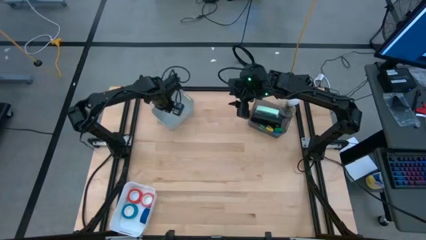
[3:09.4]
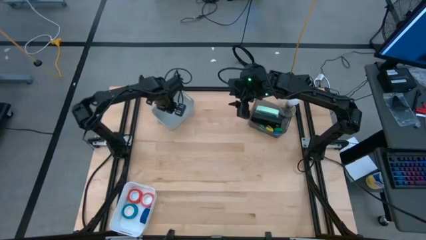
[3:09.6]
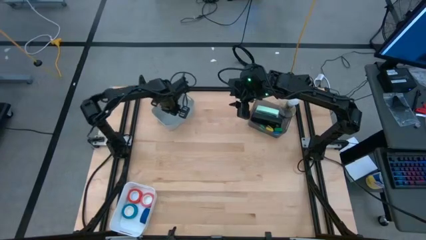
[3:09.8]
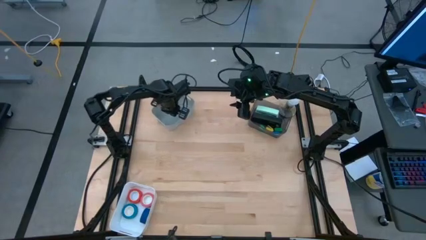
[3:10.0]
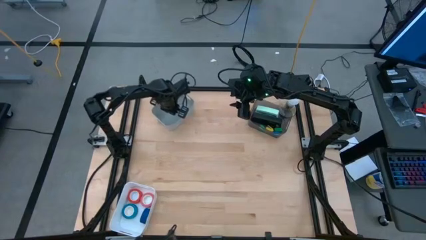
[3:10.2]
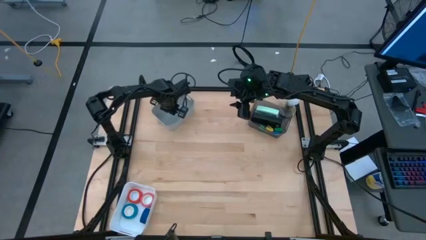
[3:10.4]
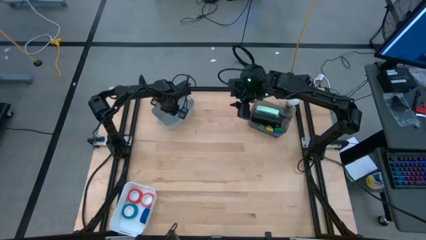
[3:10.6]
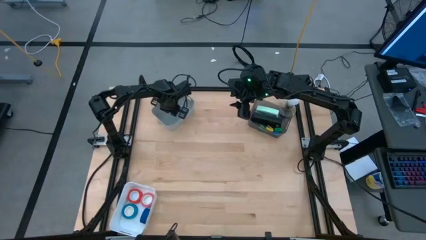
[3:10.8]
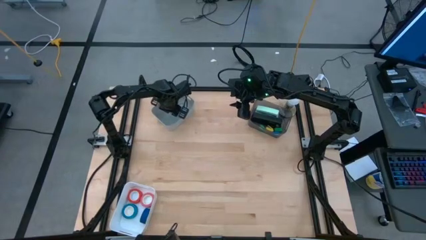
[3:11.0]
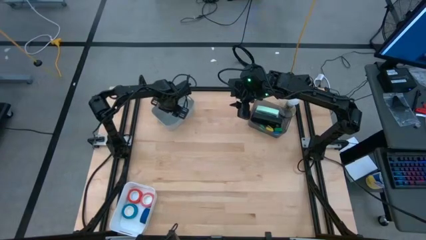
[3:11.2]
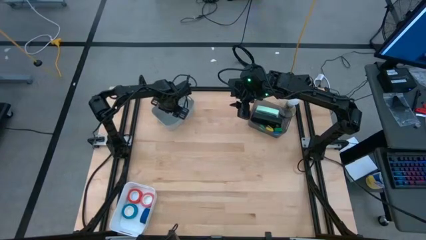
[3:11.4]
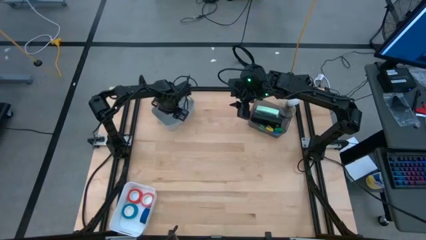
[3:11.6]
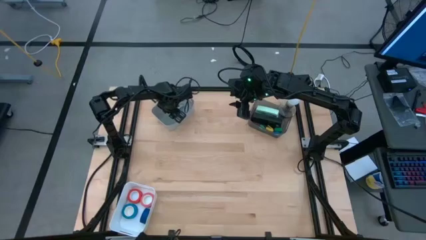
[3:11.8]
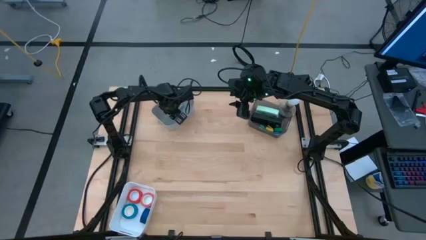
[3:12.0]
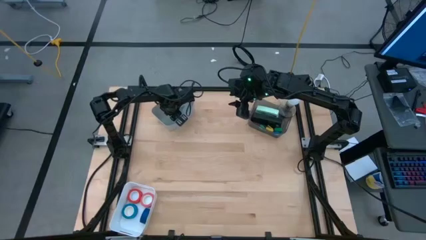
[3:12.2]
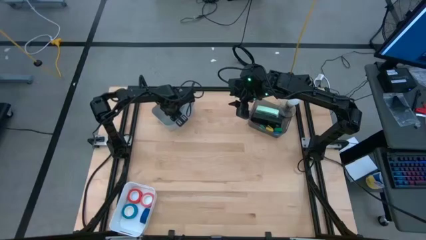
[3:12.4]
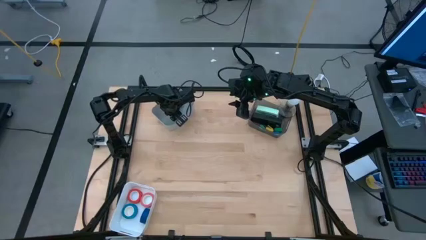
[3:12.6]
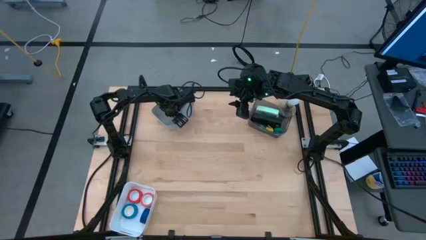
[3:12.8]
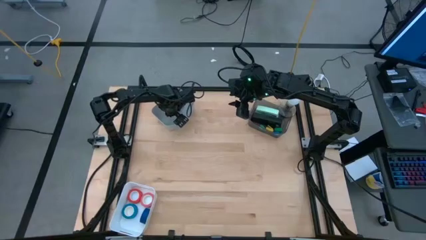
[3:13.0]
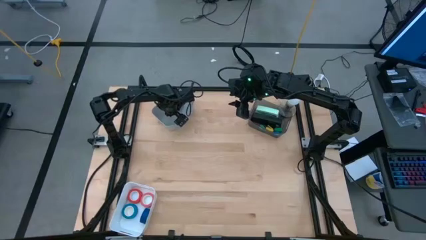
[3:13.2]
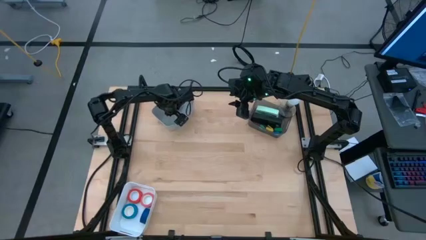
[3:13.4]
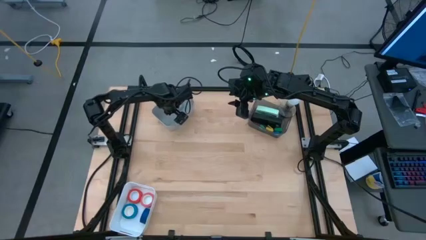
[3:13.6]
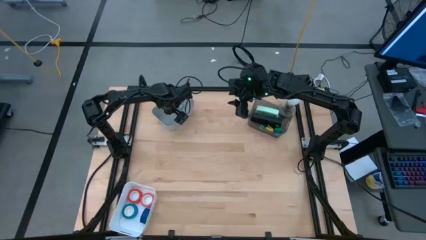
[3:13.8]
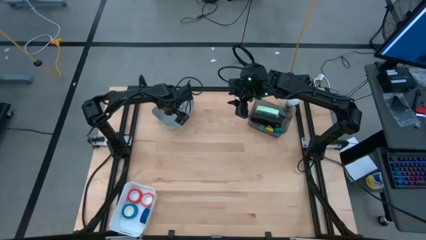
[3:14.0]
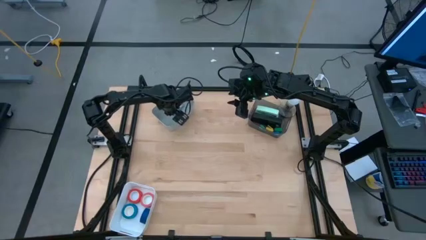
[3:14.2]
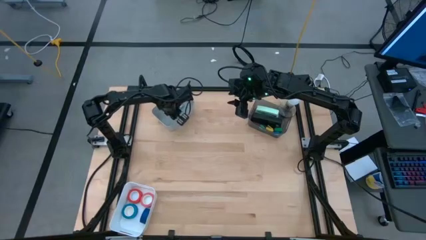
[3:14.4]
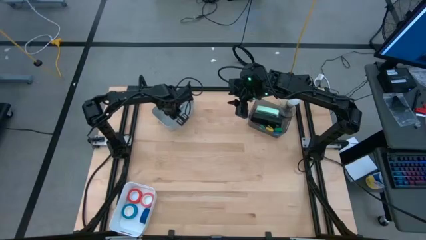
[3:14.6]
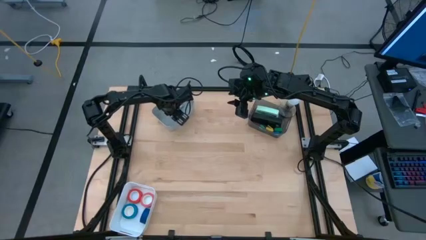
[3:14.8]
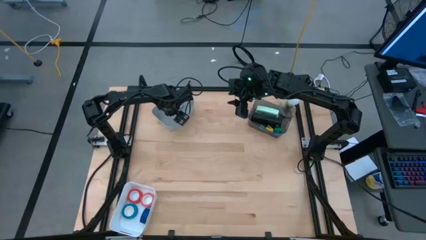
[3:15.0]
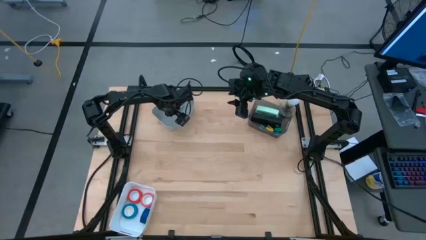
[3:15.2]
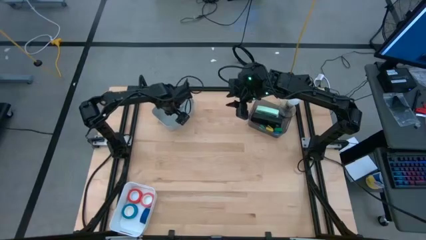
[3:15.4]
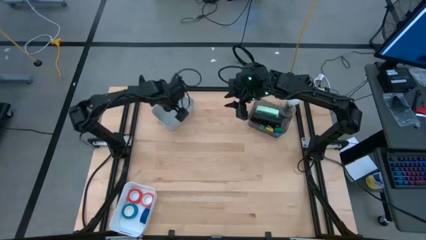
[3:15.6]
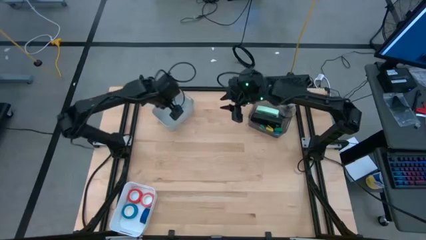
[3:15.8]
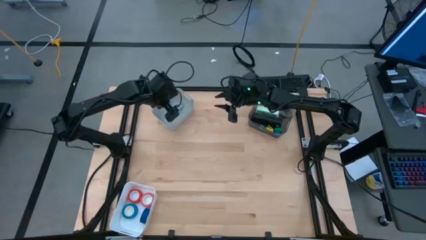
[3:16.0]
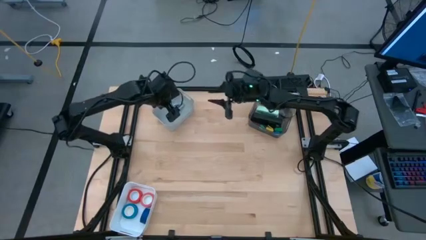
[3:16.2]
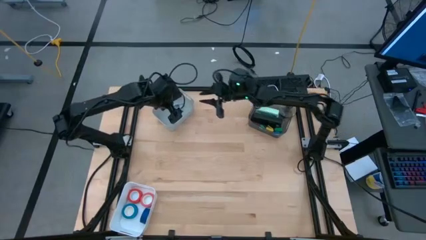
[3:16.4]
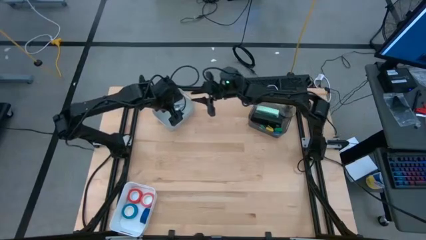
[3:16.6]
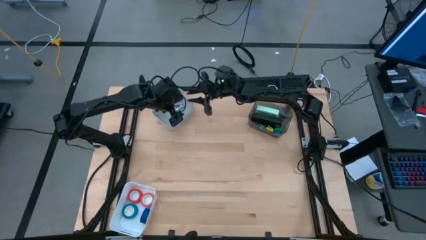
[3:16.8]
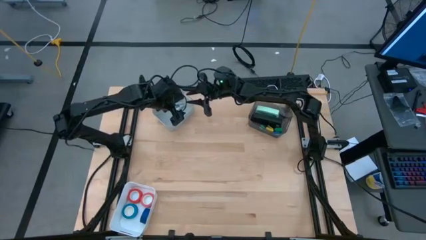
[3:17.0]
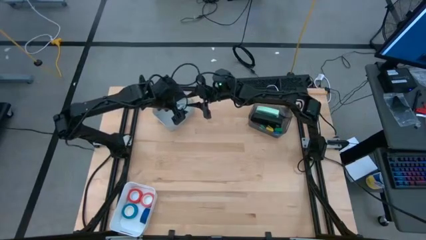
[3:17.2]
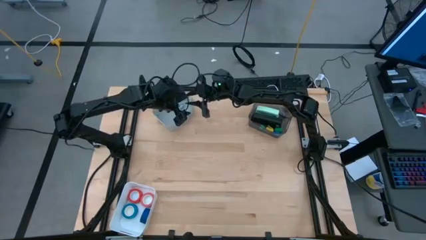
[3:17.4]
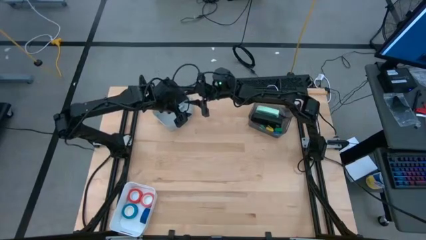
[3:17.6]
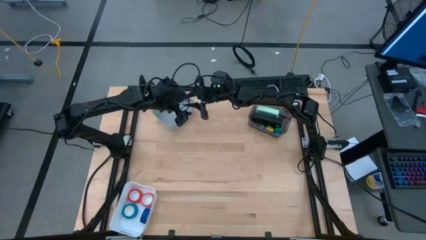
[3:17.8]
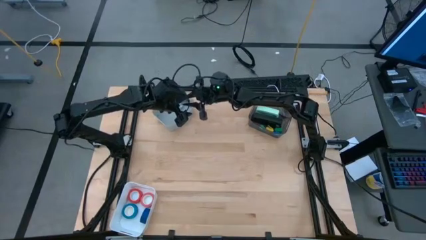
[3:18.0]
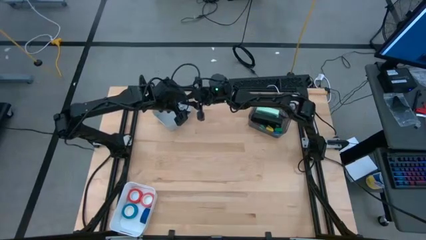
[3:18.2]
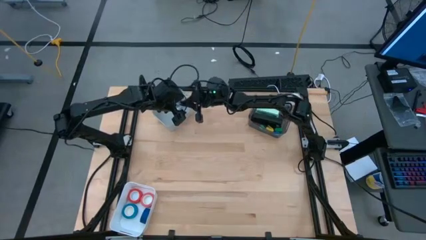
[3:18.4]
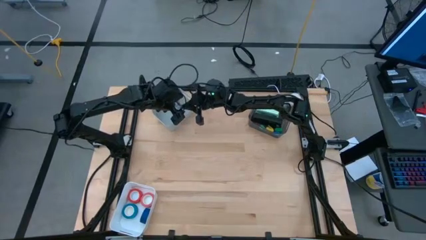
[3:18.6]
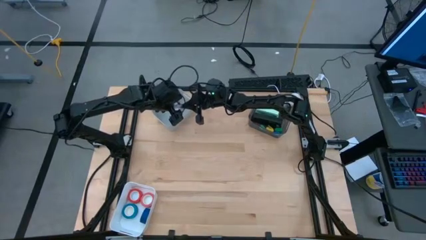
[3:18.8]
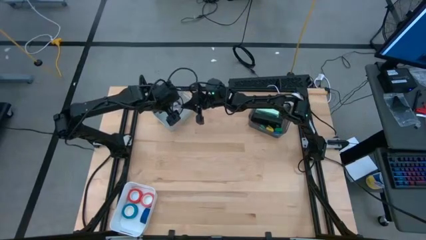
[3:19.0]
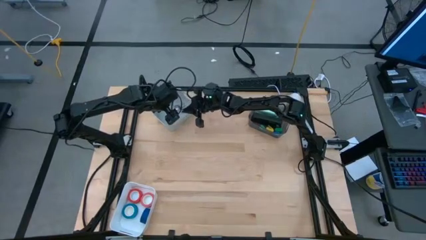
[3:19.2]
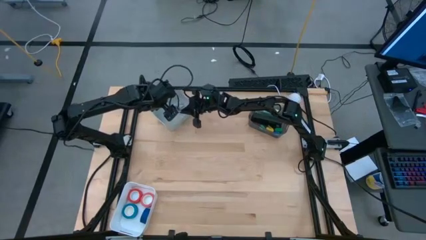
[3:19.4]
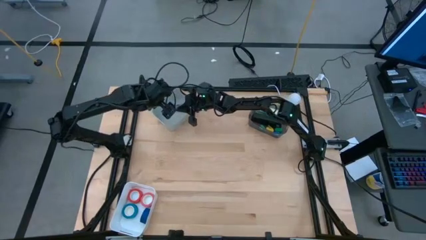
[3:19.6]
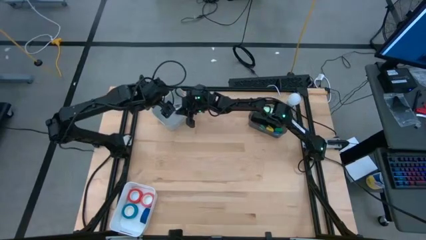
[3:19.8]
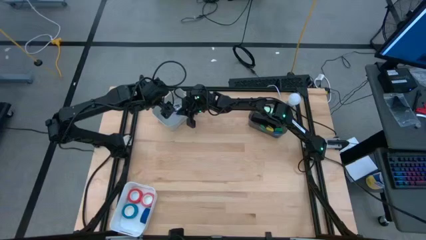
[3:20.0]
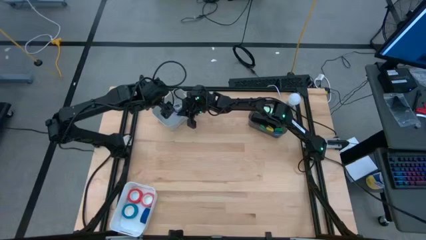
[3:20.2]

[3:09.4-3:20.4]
Task: Pick and place Stapler, Stapler remover, tape
Put the purple staple remover into the grey bin

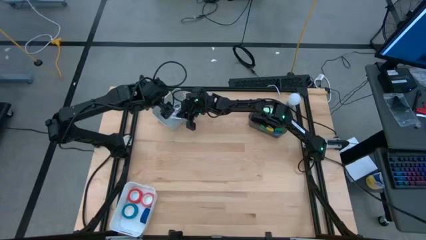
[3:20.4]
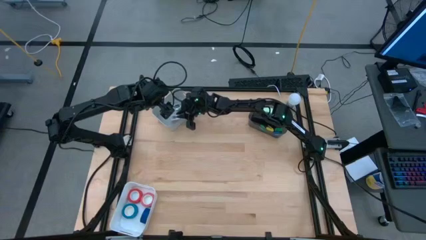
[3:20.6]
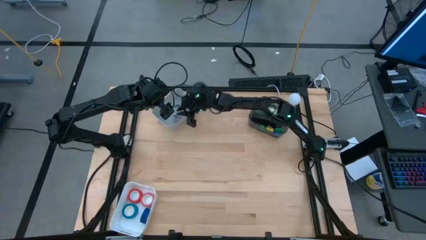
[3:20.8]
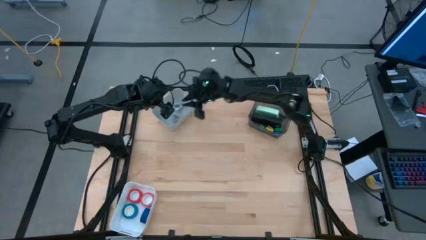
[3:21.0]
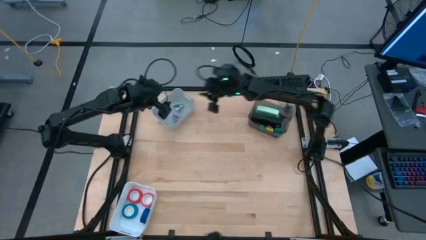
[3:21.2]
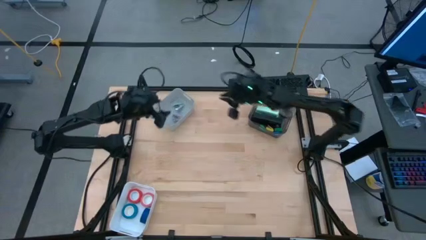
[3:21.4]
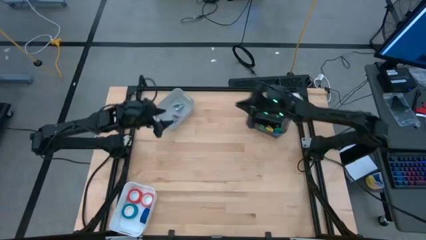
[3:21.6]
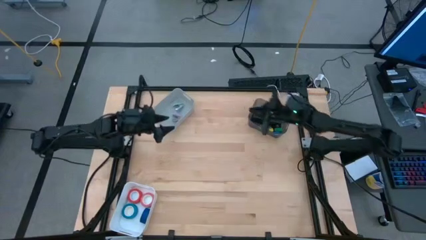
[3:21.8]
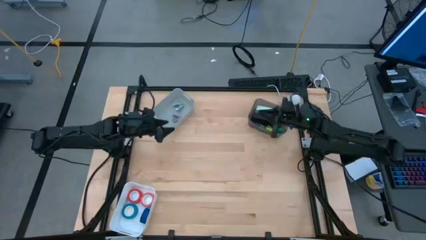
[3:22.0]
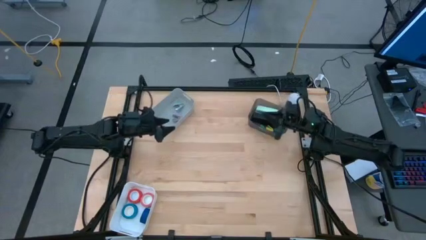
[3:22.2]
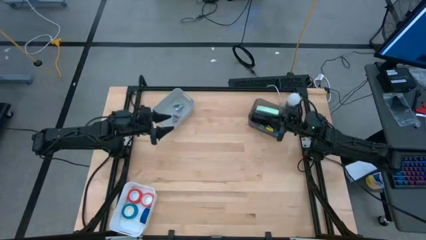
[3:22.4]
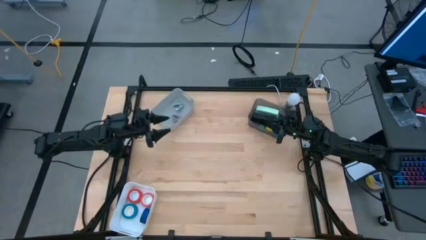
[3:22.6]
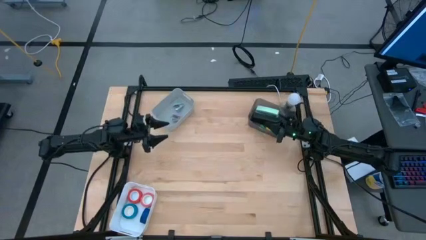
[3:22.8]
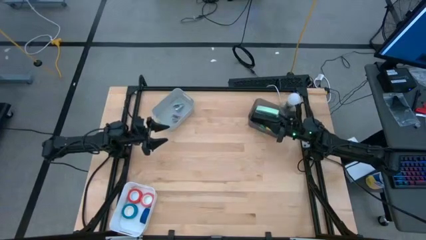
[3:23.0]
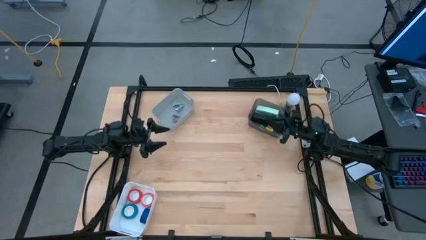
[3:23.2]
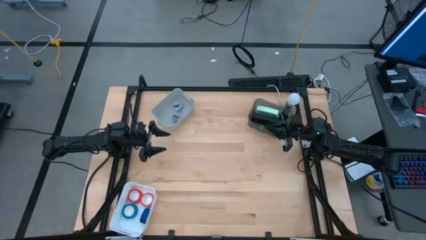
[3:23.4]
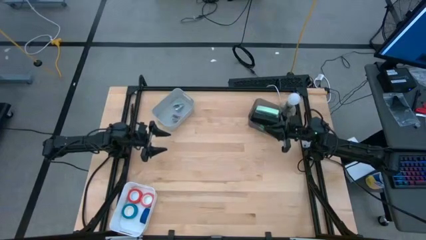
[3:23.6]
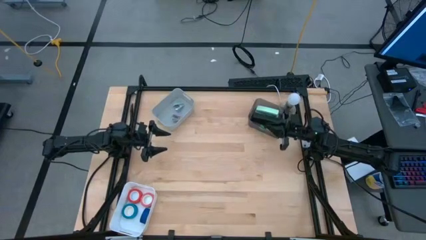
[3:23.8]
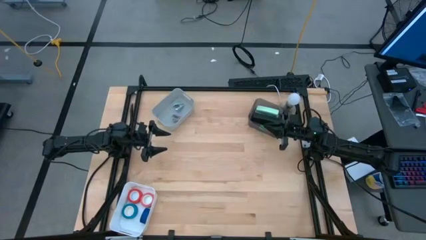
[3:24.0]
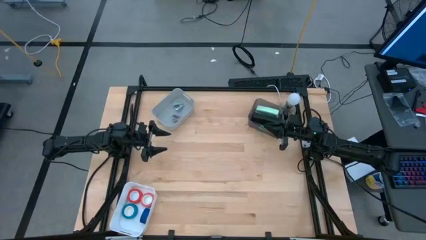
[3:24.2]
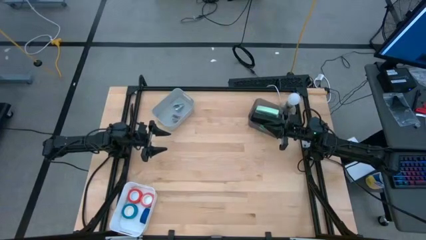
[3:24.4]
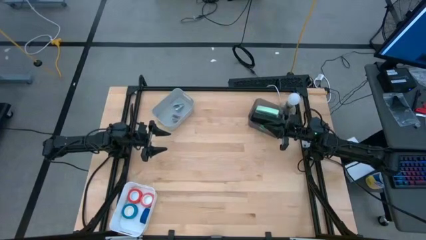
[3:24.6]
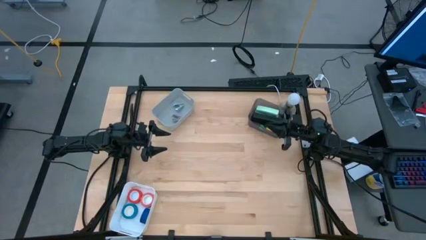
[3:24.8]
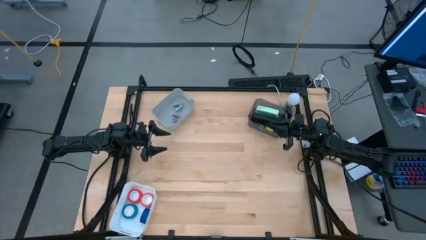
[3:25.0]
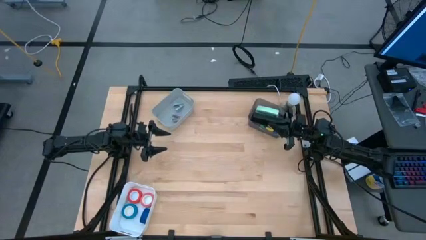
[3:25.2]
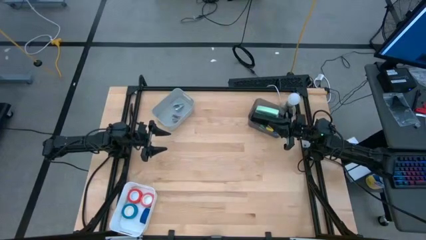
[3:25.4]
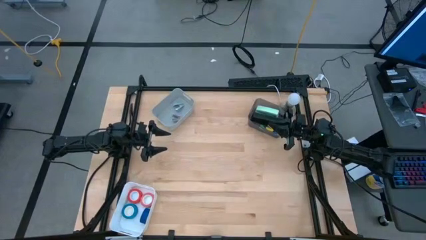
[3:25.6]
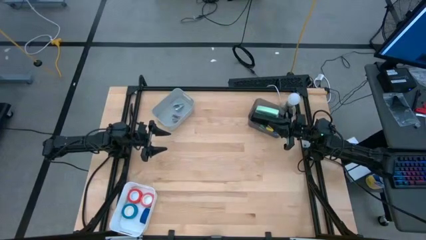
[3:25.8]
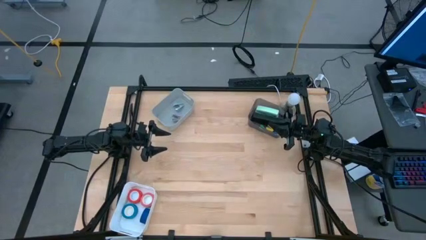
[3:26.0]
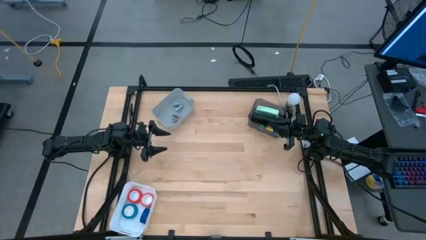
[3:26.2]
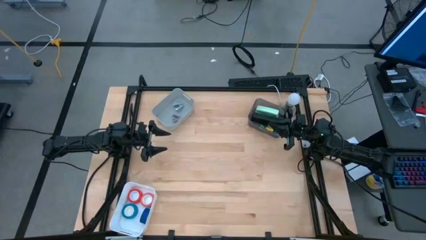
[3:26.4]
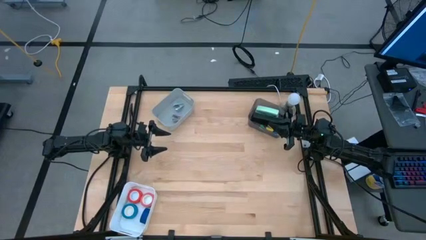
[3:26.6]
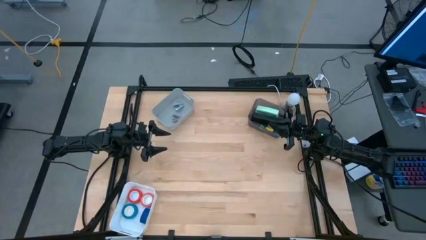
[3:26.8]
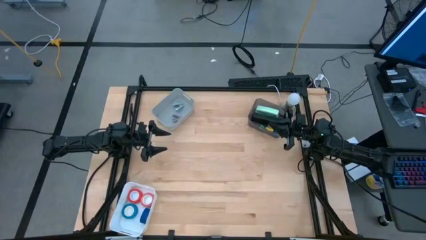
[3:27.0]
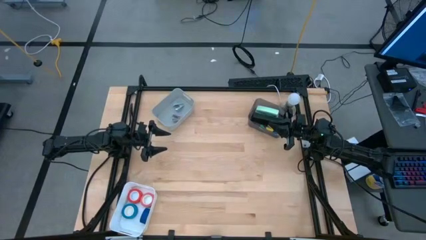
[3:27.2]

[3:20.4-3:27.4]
Return to Home Position
